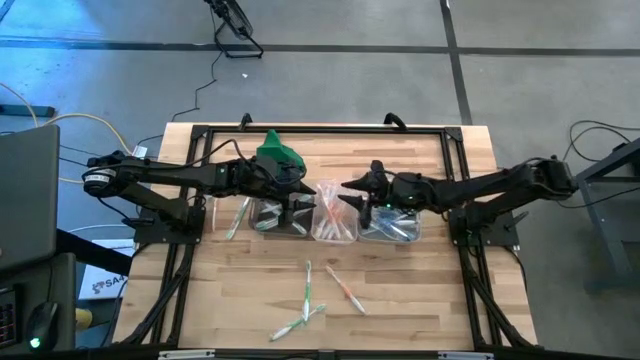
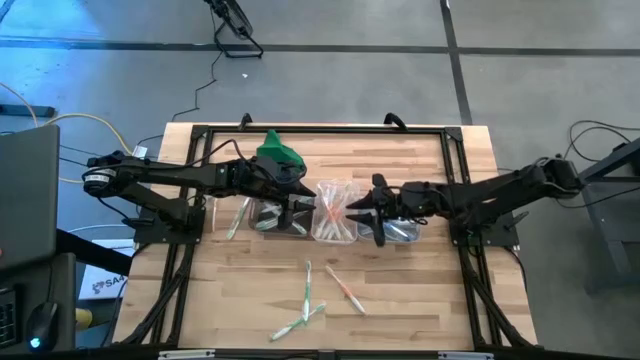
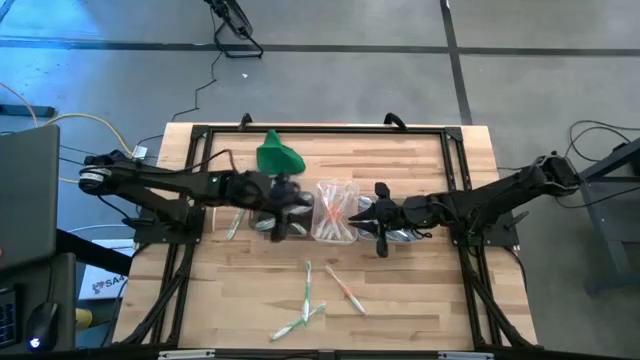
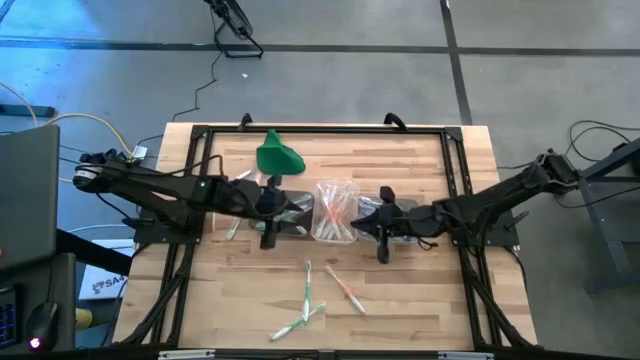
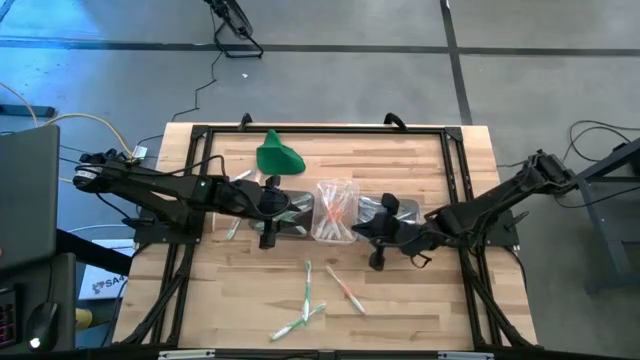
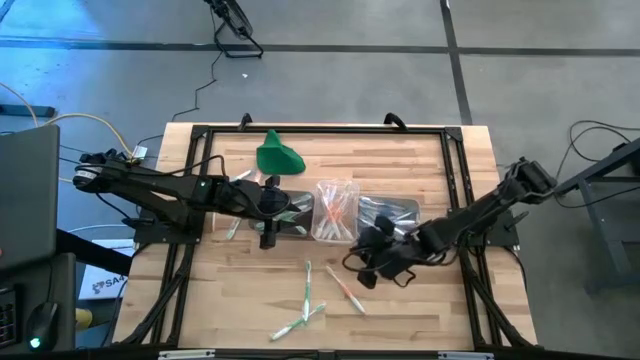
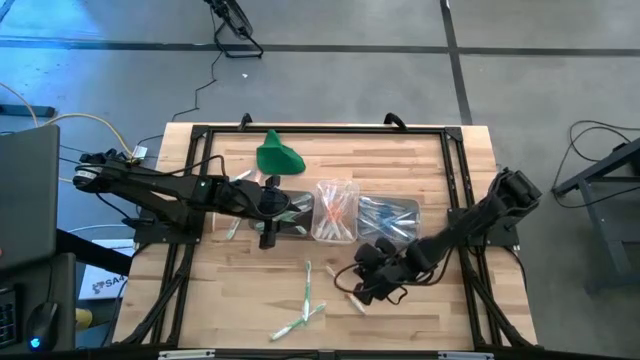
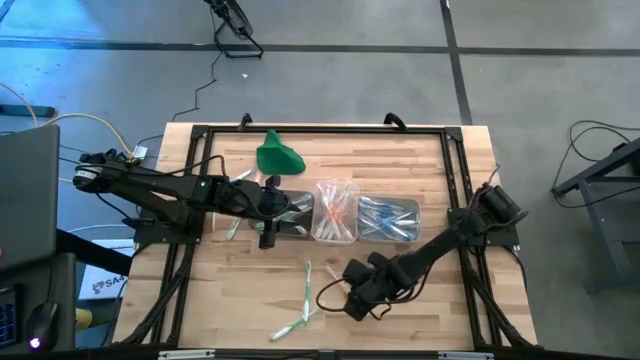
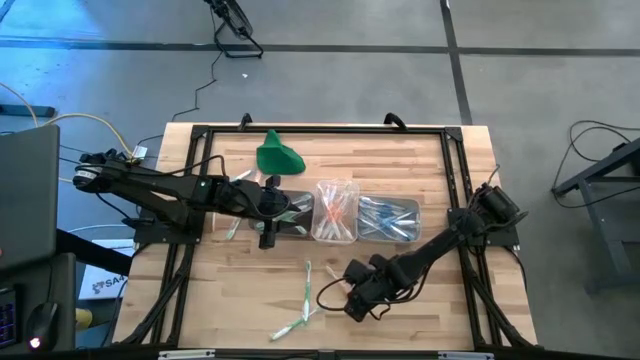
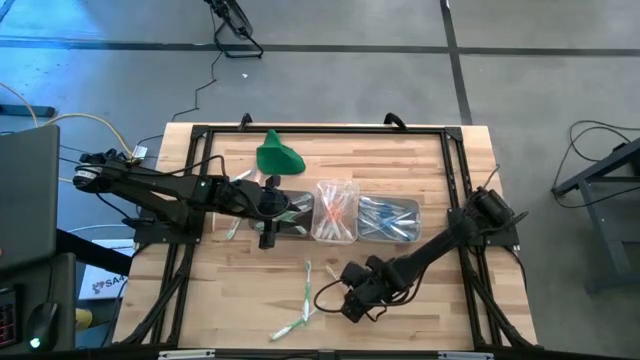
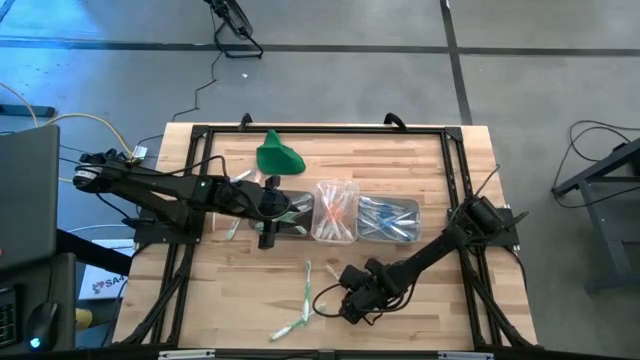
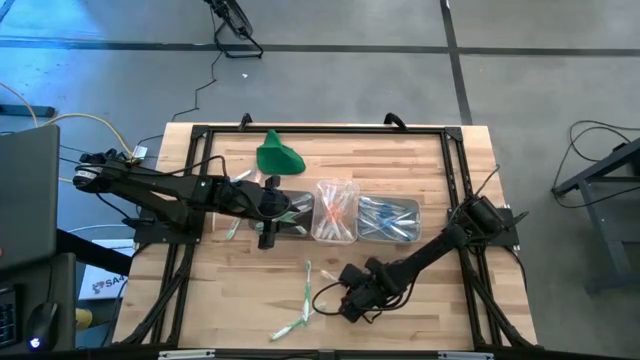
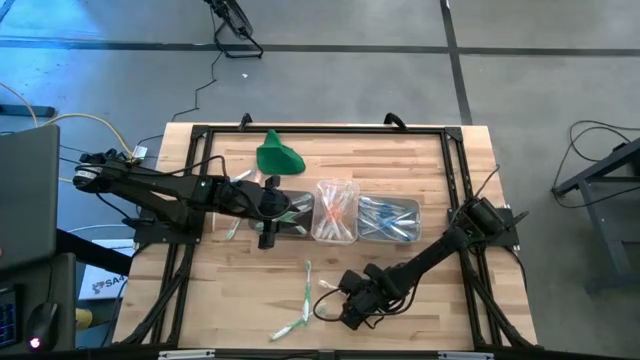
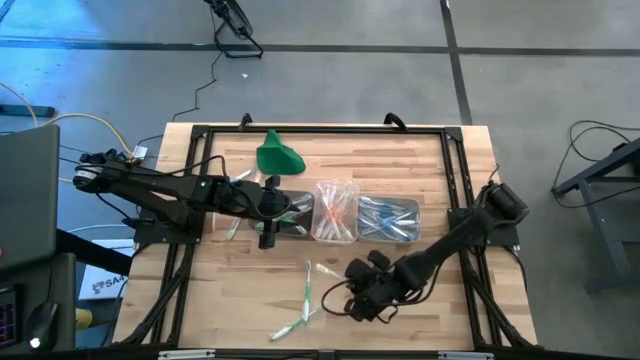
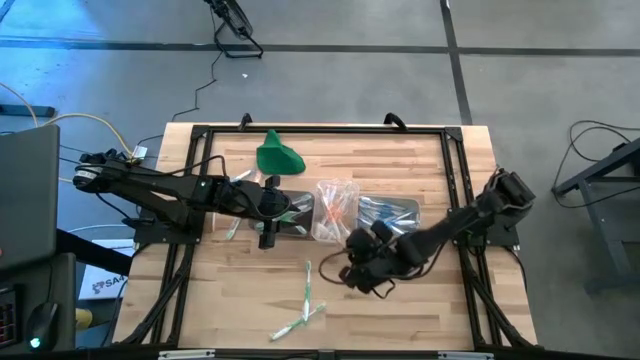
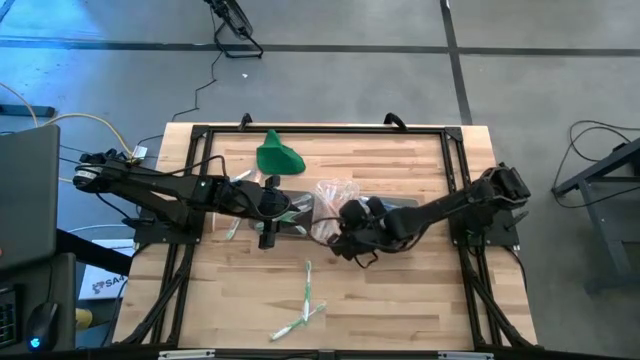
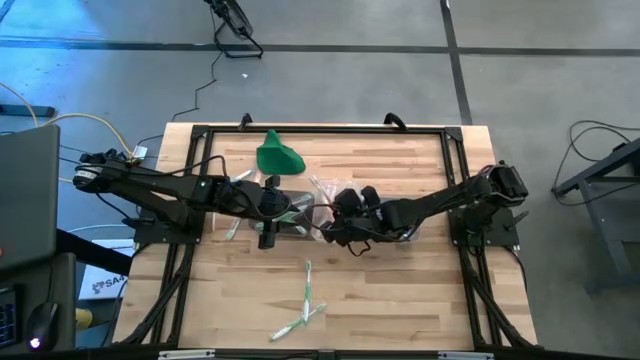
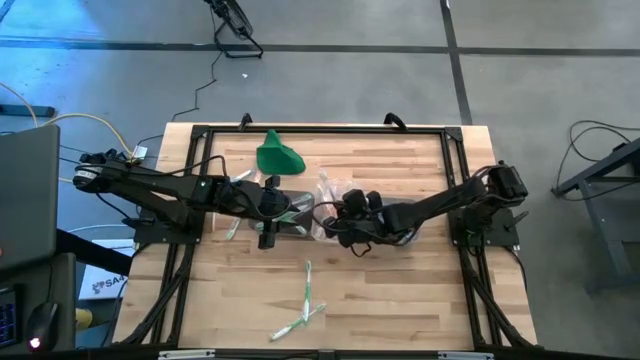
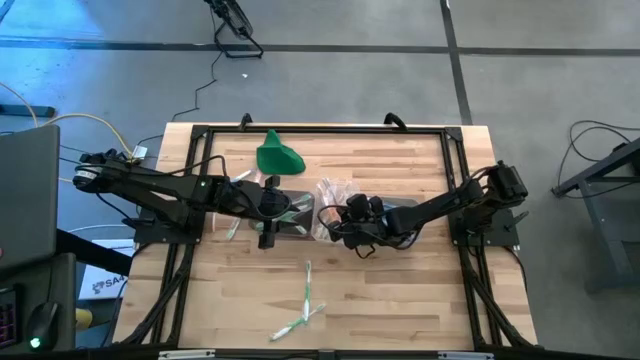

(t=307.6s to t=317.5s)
Task: Pick & Place Toothbrushes
Put the orange toothbrush into the transparent bin

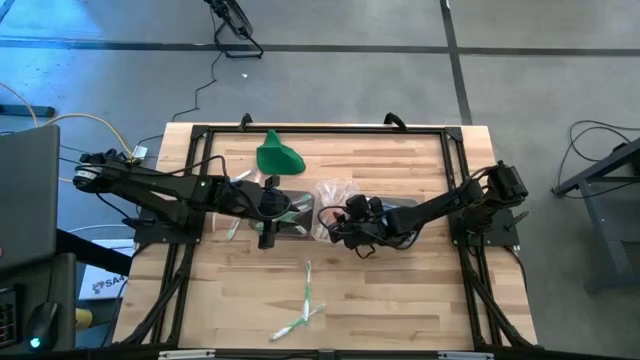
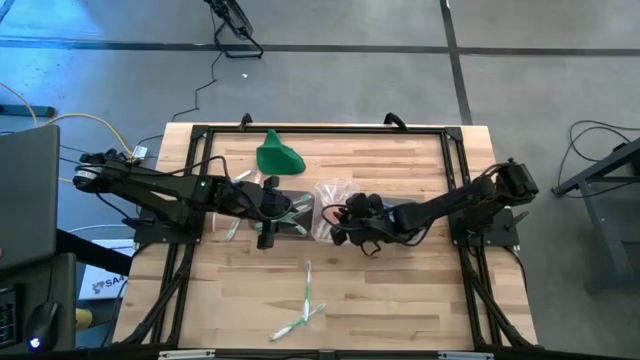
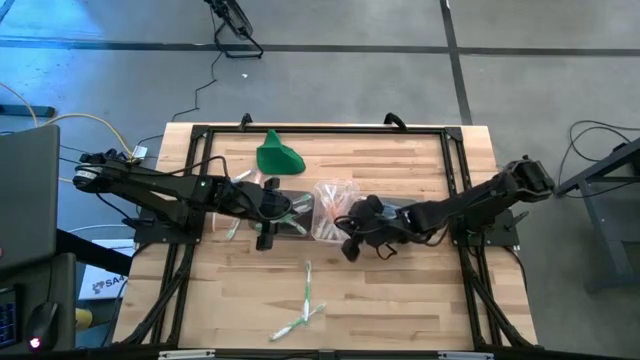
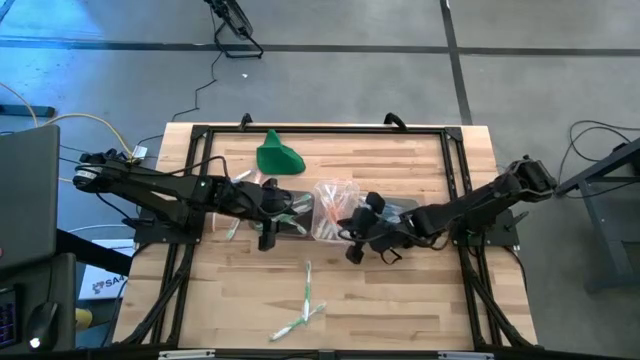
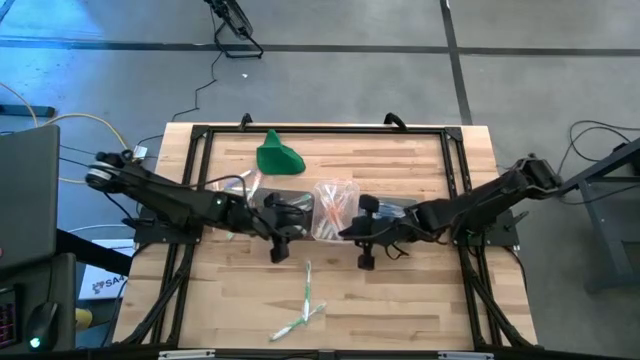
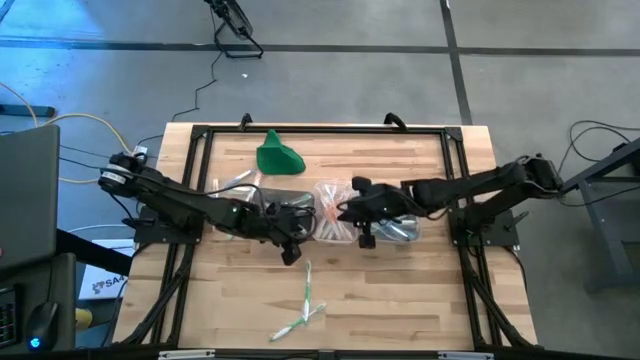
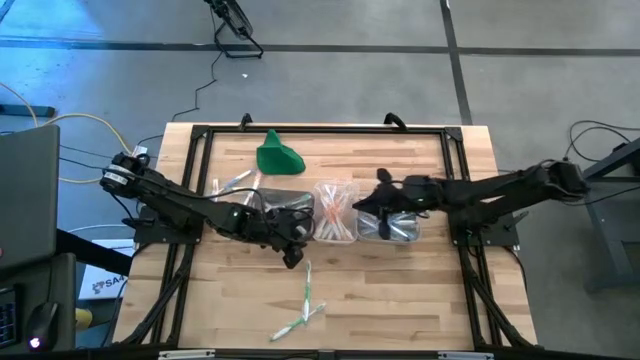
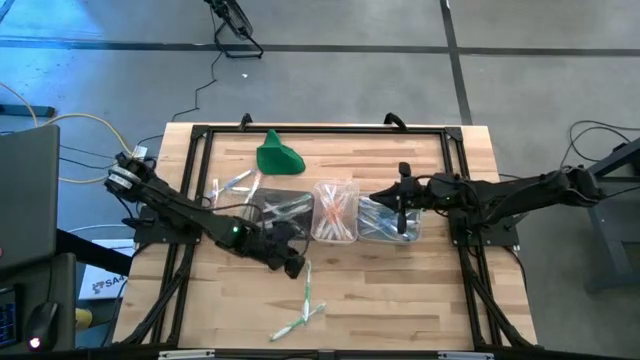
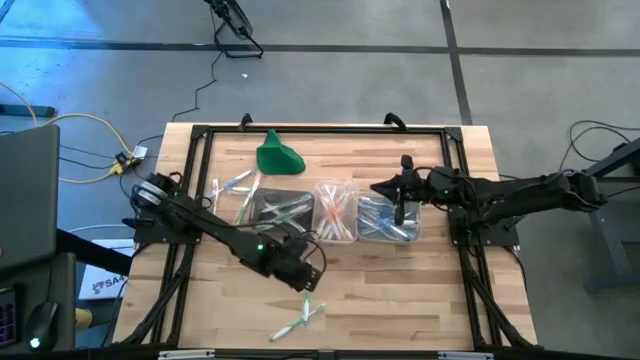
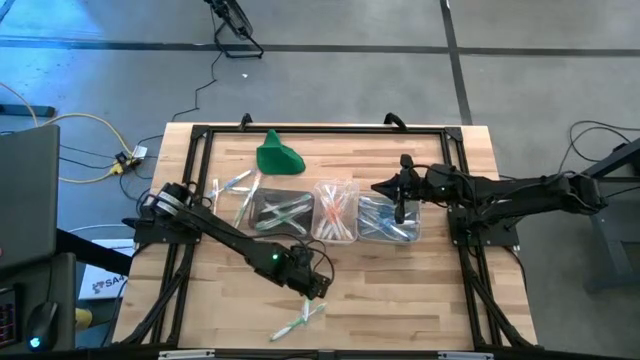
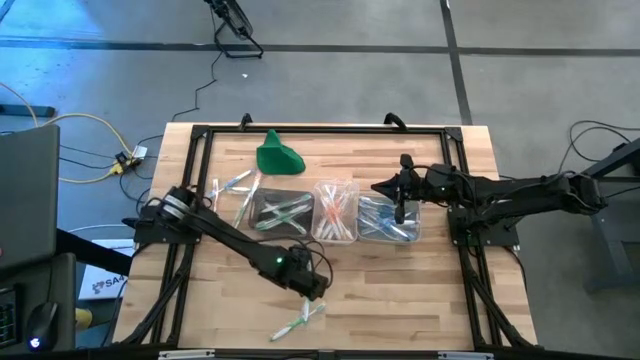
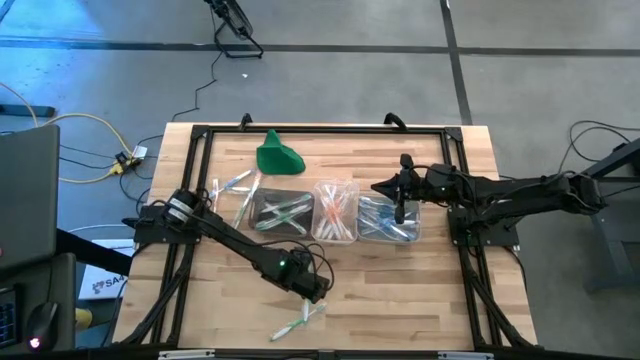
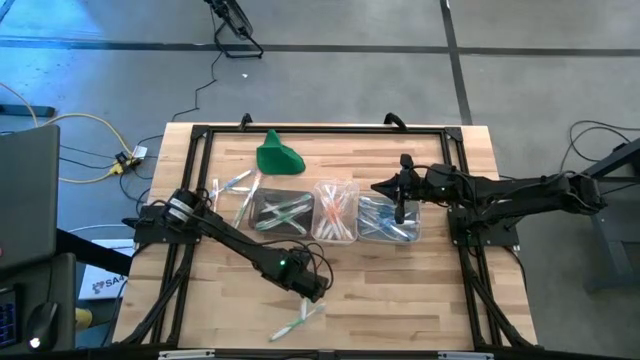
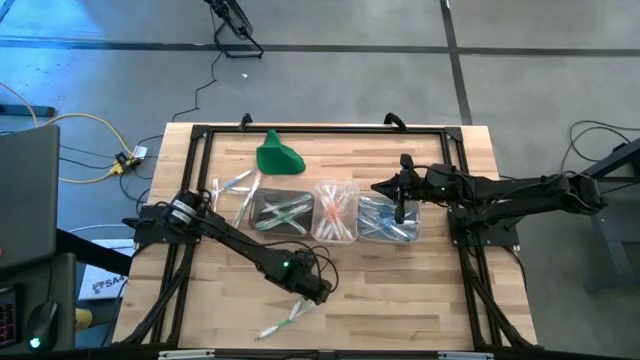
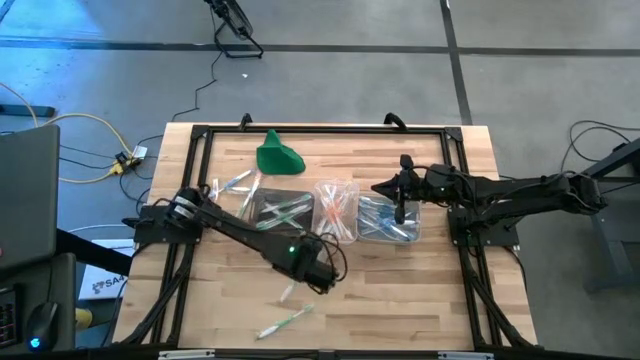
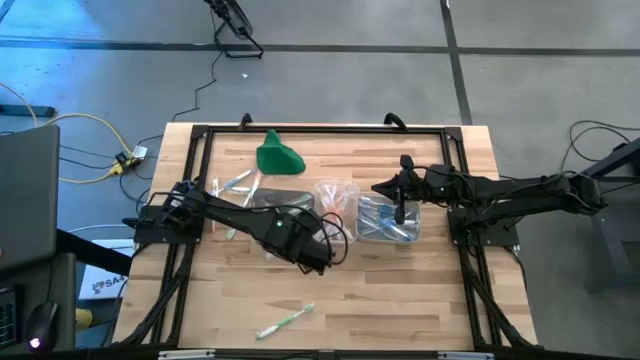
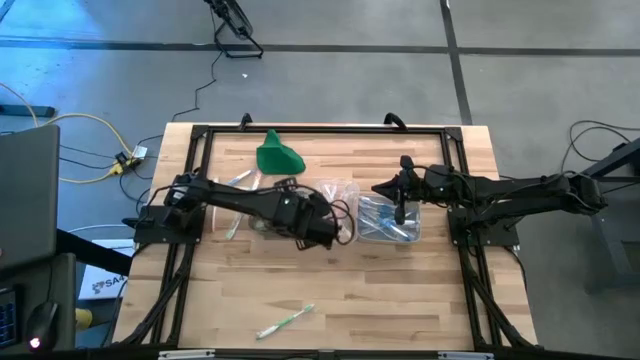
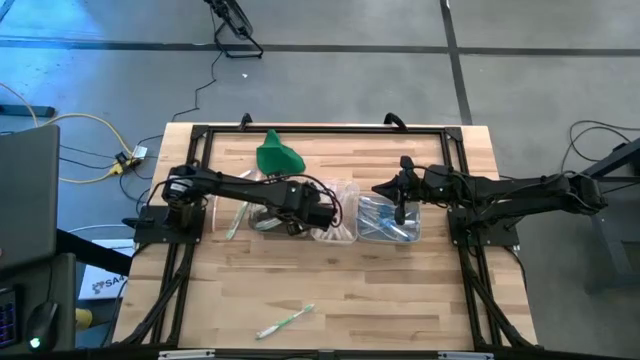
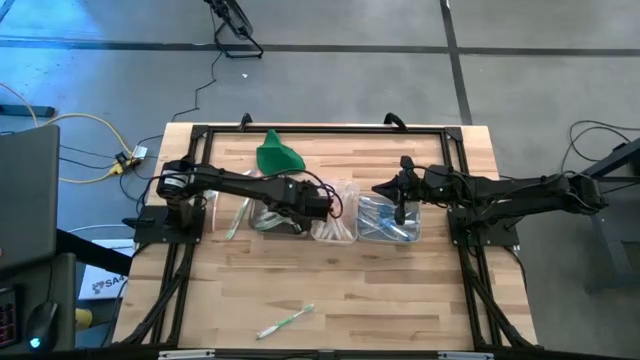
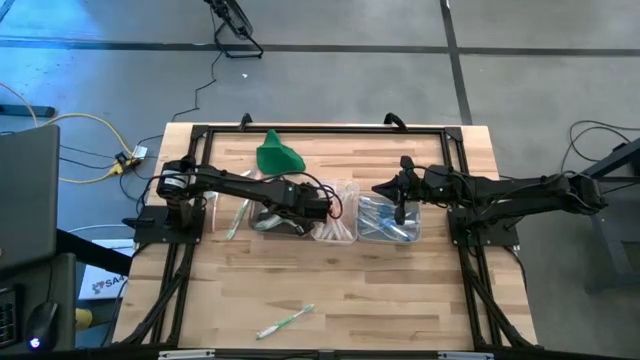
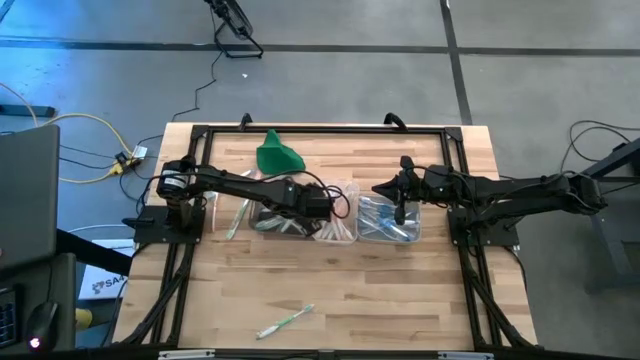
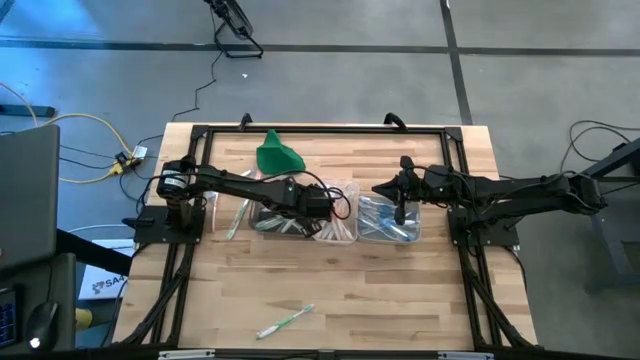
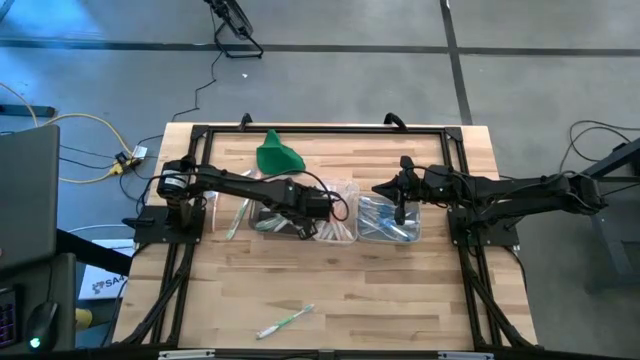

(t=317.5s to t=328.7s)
Put the green toothbrush into the black bin
